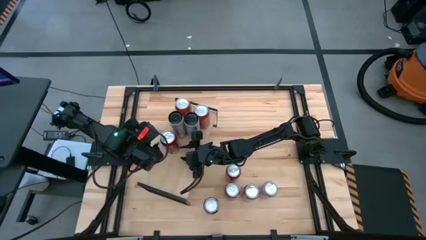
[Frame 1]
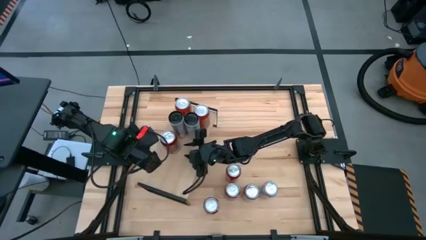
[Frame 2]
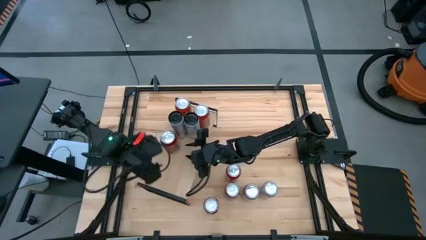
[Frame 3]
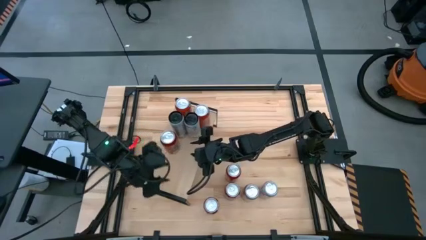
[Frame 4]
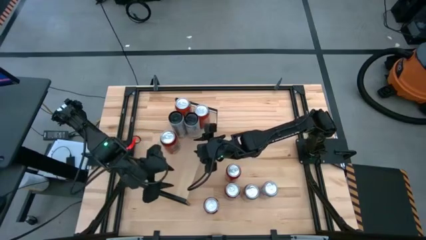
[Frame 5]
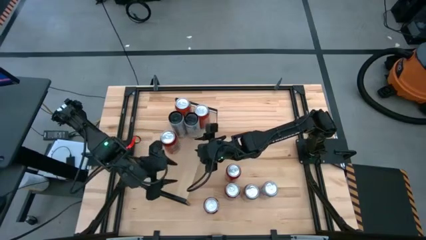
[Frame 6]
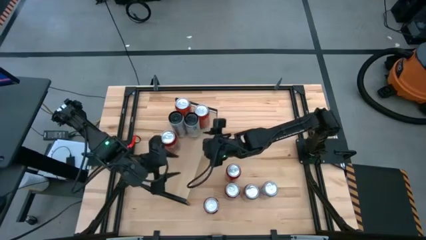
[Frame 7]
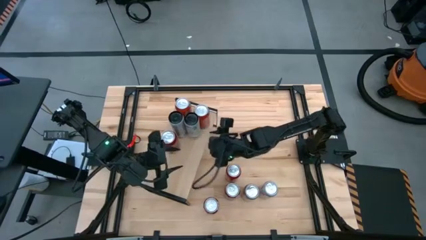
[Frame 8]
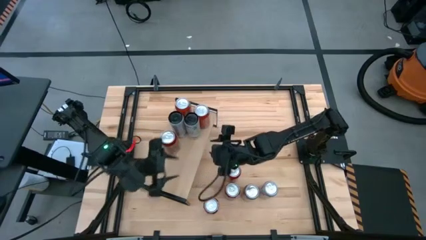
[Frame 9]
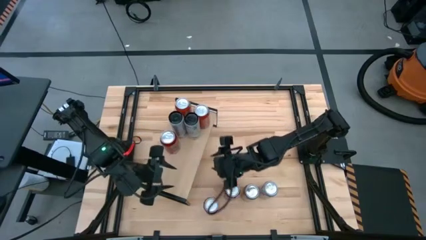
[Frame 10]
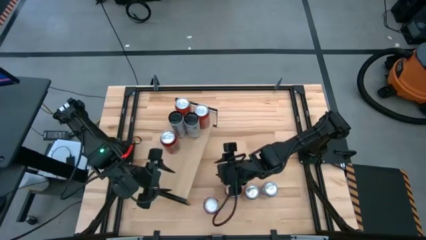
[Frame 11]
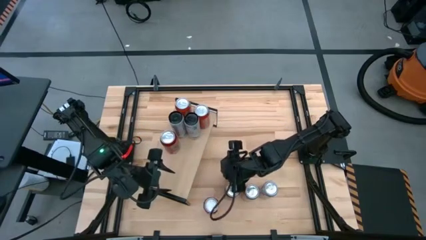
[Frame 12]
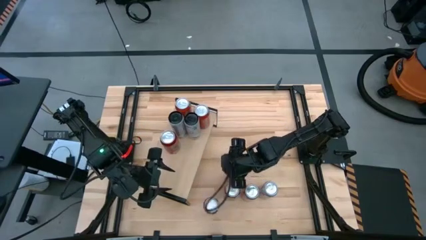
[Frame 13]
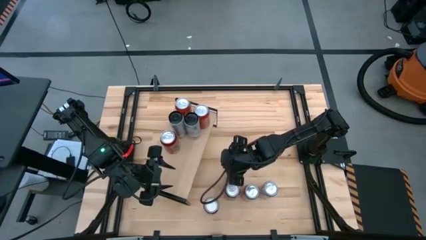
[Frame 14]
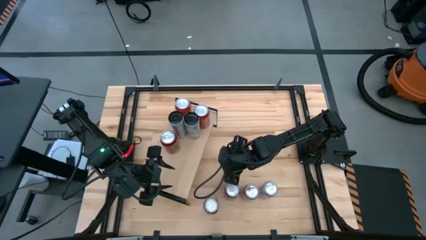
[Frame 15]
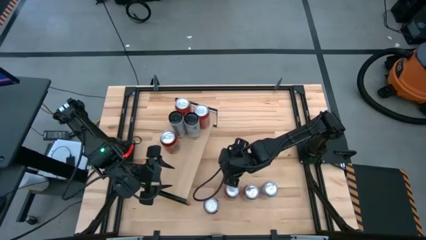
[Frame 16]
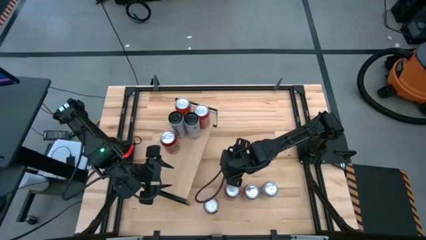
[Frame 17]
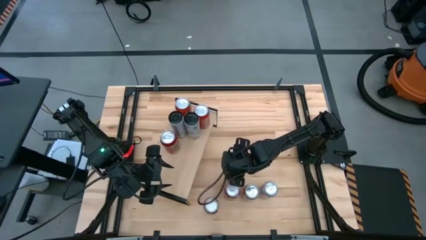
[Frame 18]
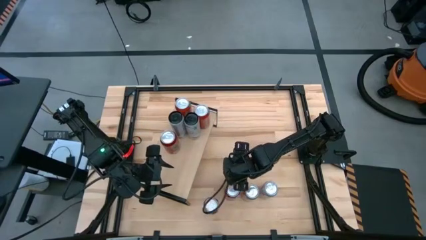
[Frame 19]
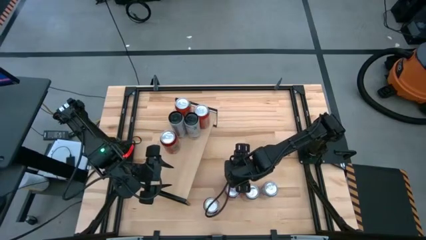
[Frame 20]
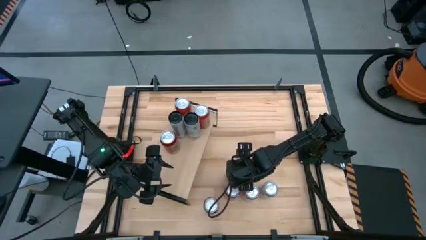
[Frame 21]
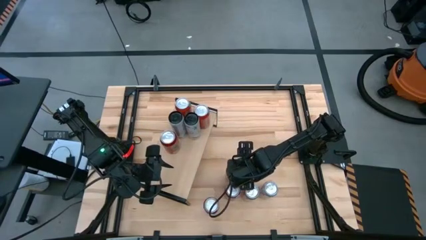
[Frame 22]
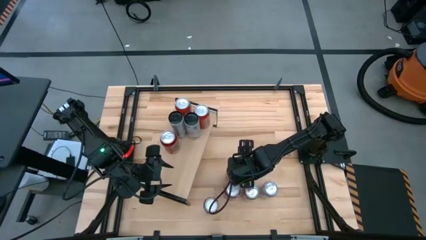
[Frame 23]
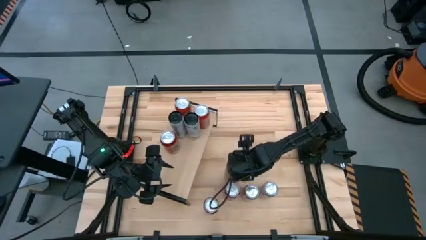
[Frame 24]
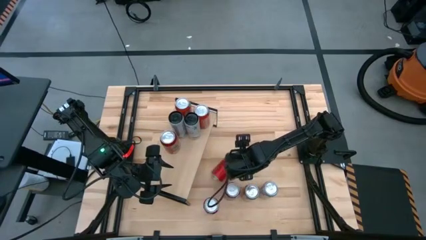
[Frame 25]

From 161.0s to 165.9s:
Task: Place canned beverage on shelf
Put the middle red soda can on the shelf

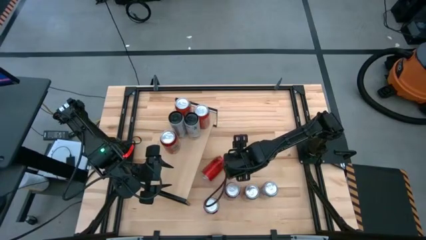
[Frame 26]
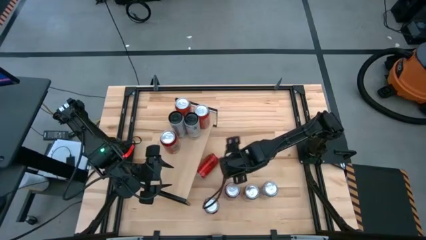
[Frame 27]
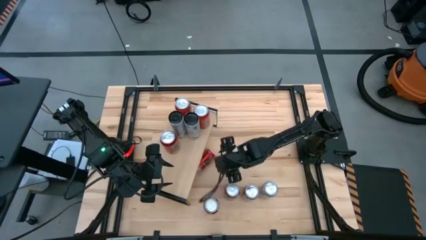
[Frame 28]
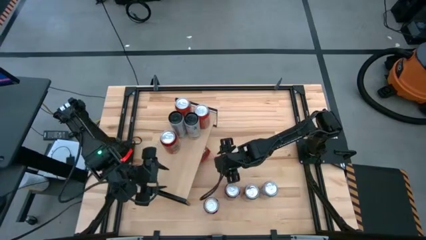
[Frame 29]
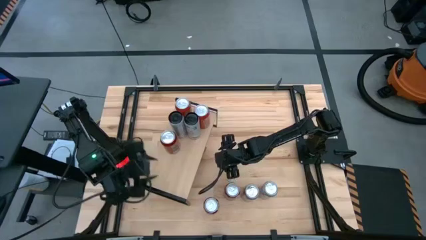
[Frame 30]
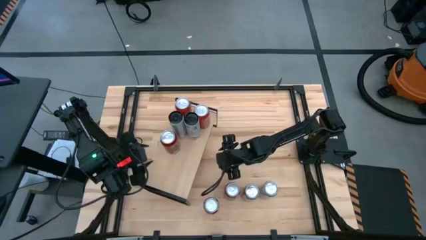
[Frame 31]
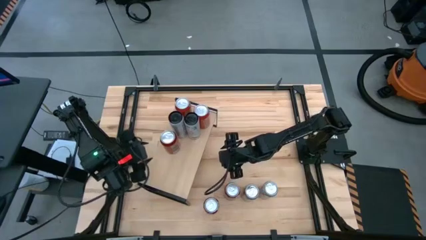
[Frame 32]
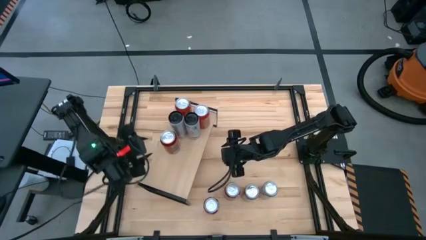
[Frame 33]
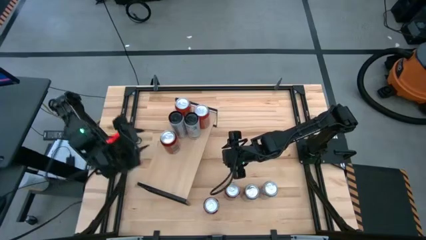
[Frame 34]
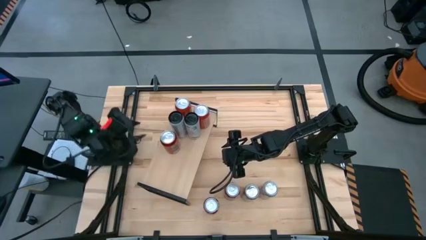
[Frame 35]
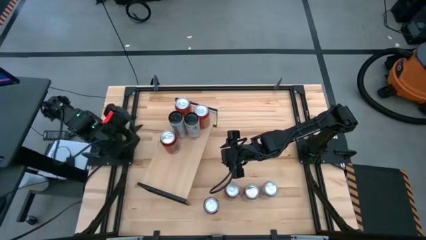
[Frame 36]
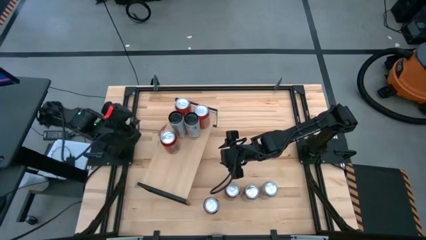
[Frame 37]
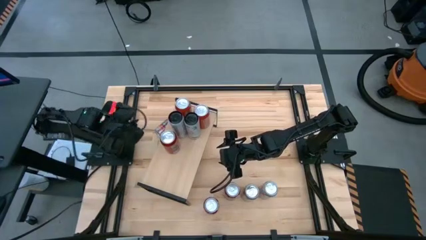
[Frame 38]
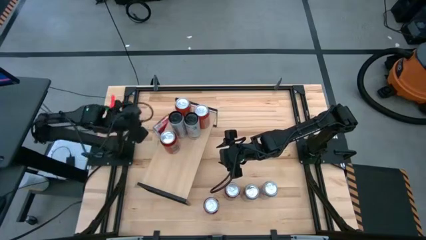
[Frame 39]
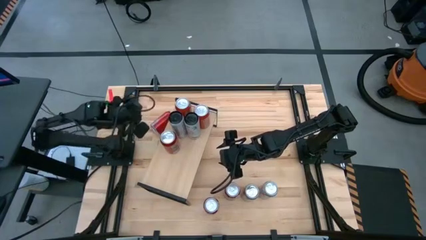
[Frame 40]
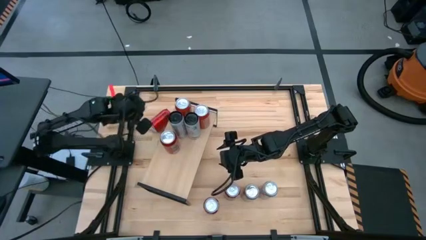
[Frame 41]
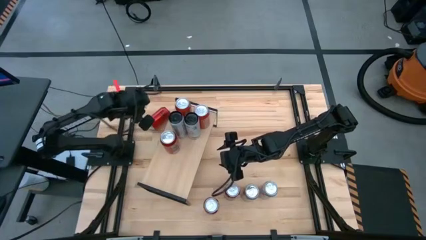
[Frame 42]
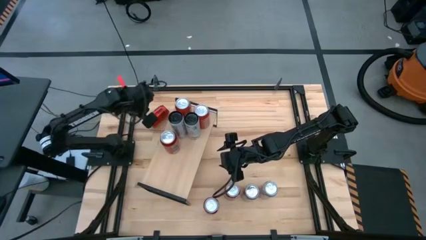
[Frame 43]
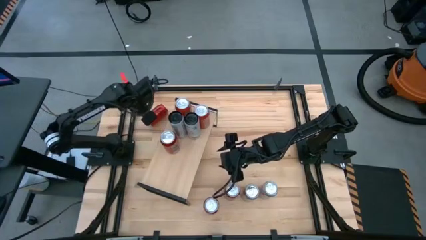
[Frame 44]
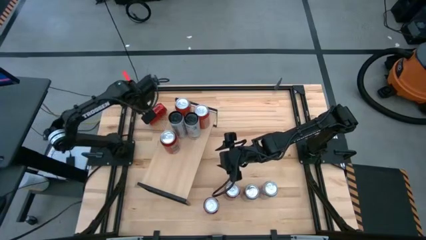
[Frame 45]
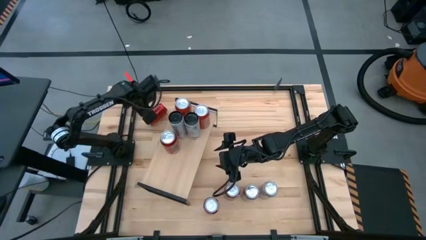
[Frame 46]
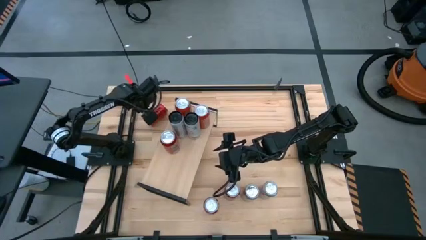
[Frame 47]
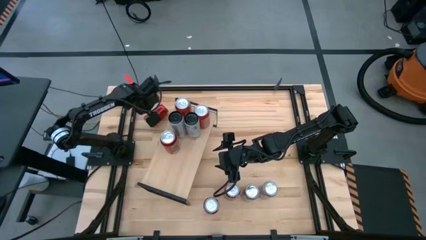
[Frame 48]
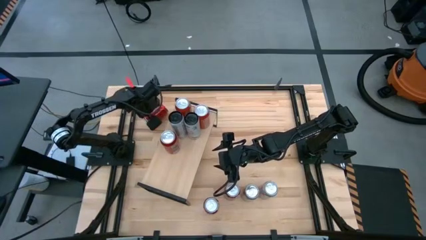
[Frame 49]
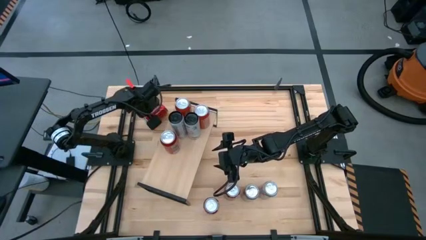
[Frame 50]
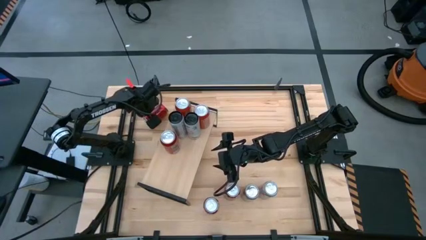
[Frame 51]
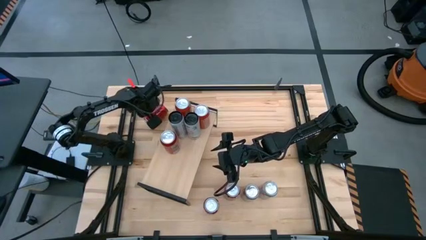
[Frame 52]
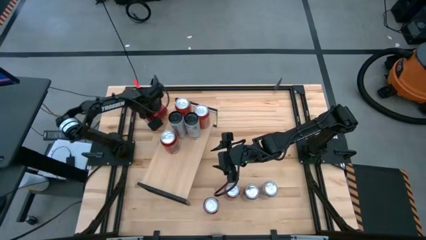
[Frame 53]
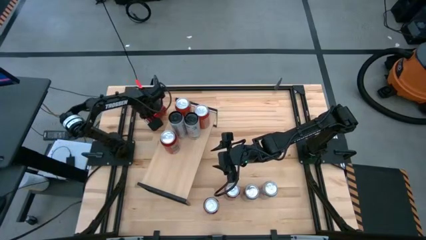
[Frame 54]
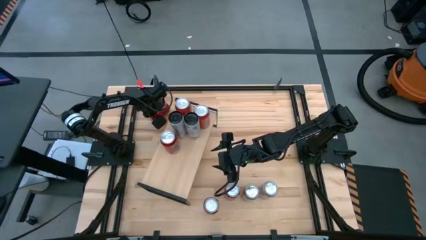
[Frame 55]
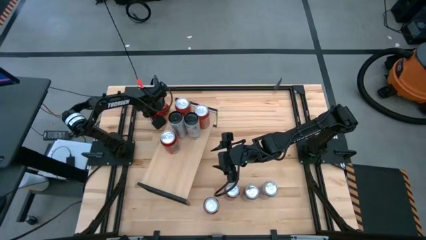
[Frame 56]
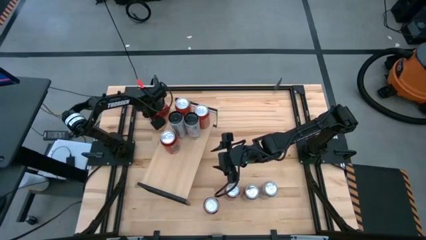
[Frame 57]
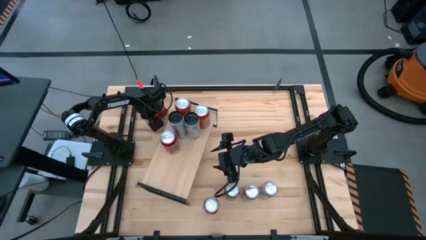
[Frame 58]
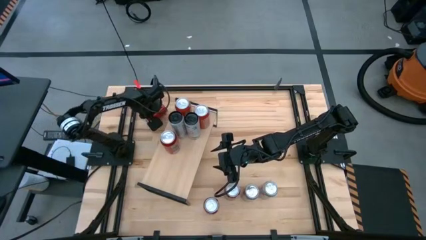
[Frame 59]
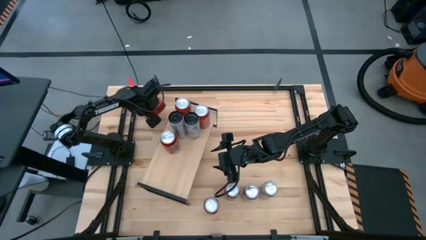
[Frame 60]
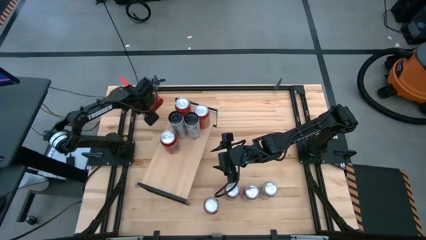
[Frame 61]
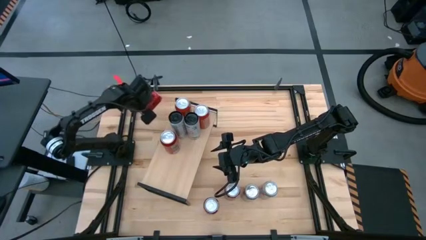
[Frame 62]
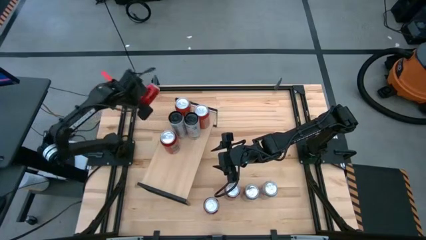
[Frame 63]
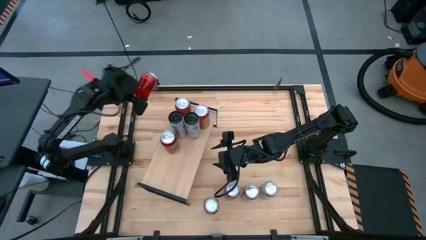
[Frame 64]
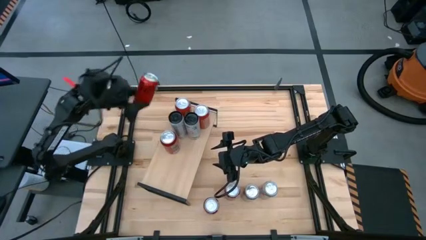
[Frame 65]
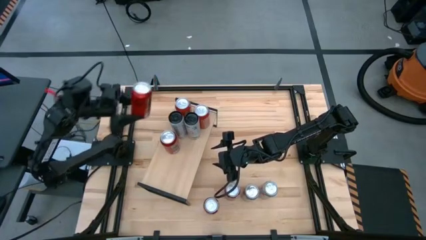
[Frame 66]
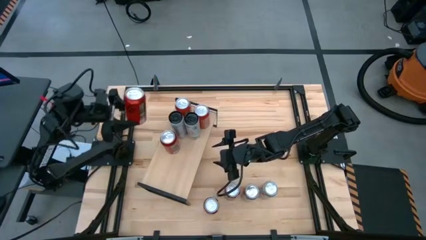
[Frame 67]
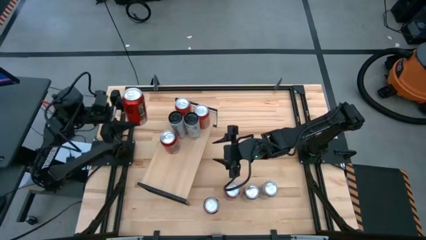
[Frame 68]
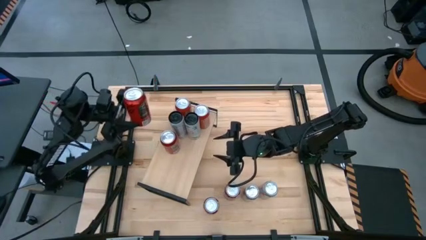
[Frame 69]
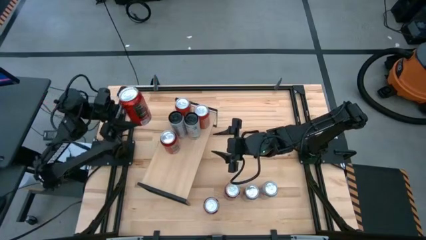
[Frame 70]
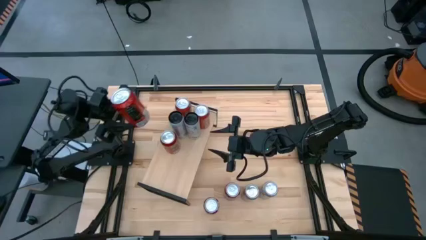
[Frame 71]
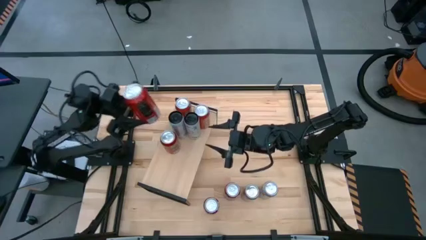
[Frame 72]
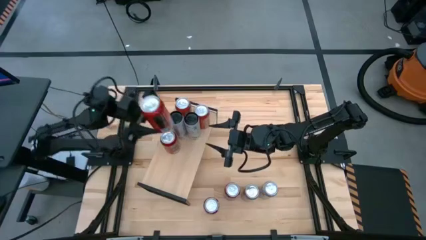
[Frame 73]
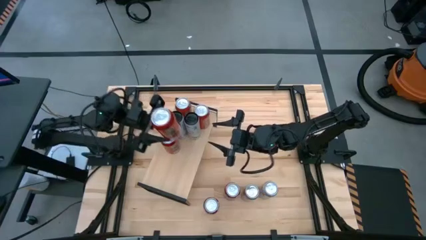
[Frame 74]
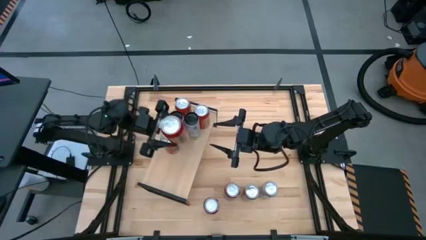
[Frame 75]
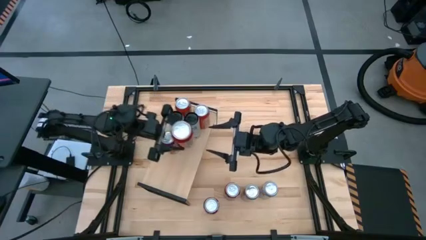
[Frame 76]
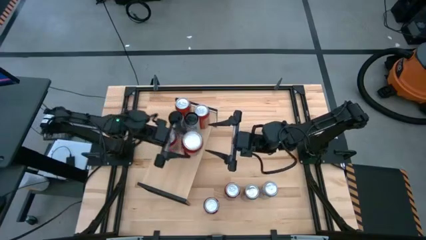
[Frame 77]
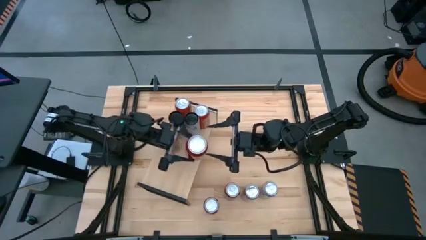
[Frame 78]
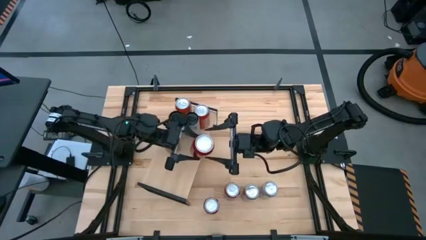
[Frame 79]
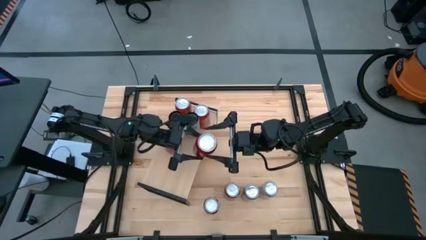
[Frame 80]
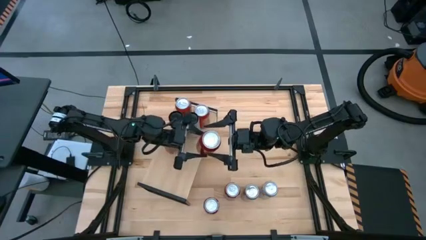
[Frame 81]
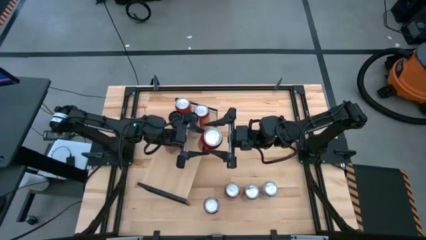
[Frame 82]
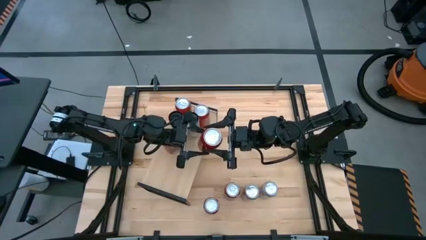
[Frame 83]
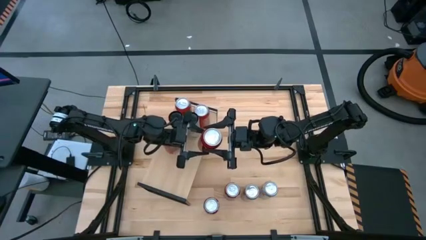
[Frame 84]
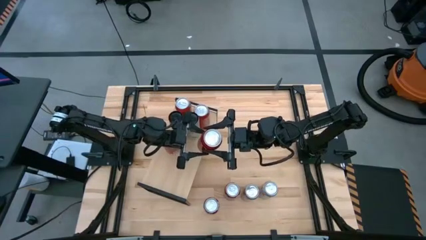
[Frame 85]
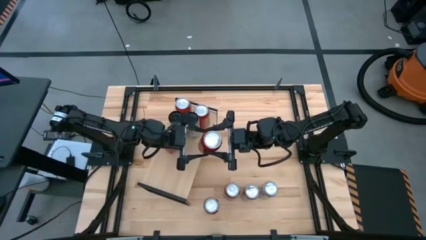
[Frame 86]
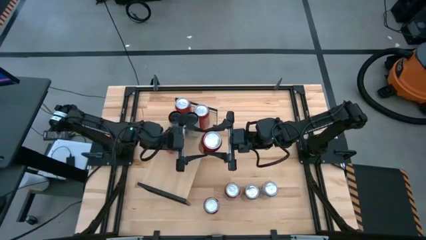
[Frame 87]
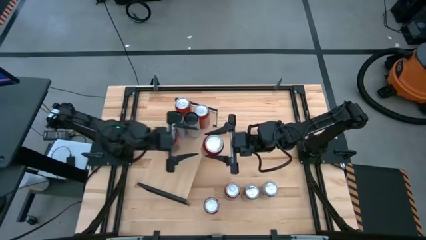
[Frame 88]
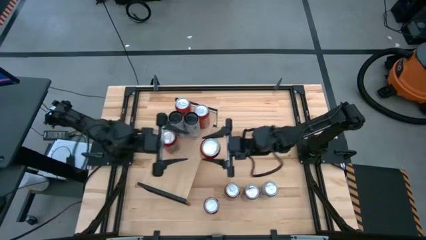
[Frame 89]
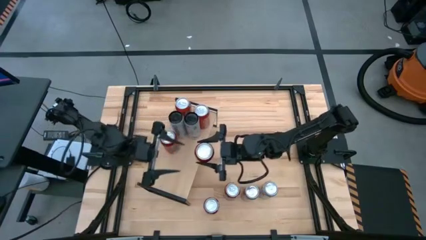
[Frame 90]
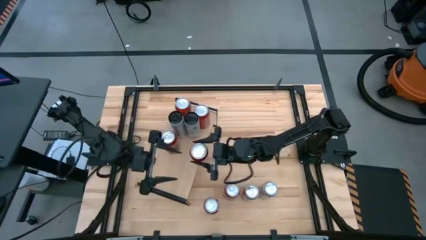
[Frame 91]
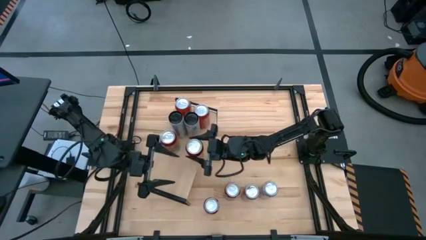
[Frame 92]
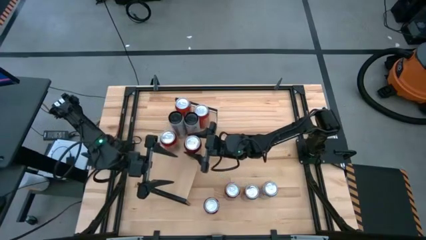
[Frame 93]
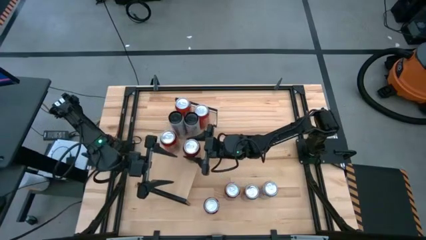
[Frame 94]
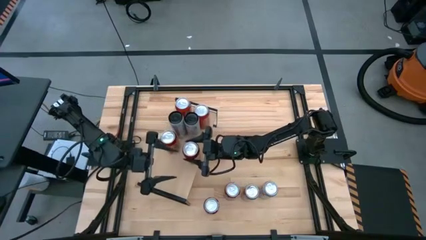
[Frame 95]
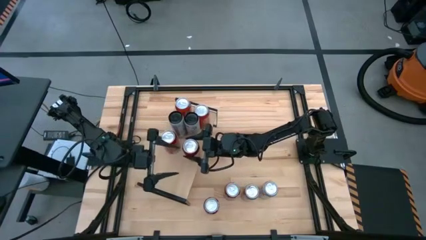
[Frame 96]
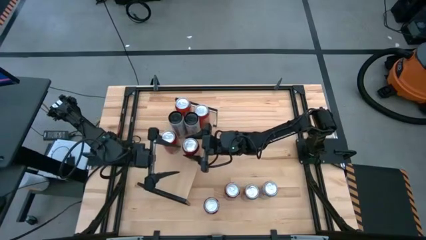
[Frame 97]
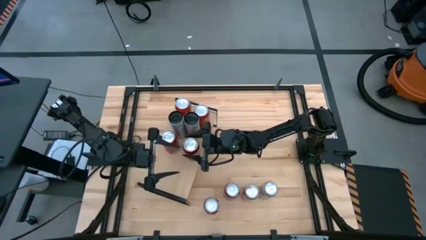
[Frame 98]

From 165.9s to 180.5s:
Put the middle red soda can on the shelf
